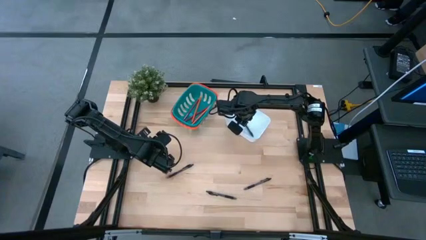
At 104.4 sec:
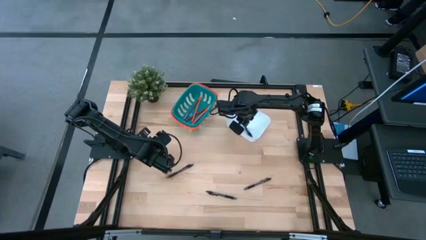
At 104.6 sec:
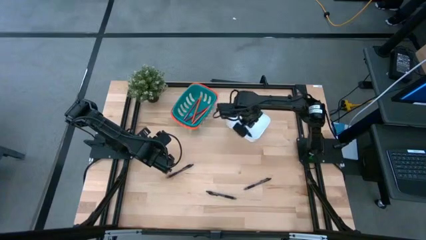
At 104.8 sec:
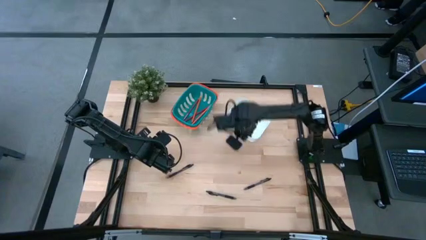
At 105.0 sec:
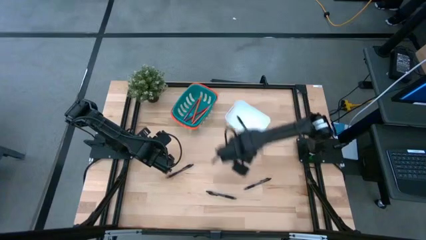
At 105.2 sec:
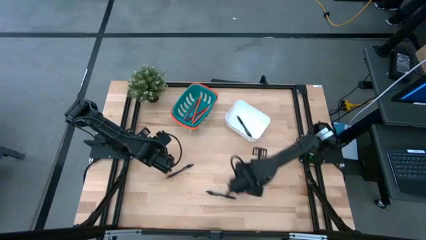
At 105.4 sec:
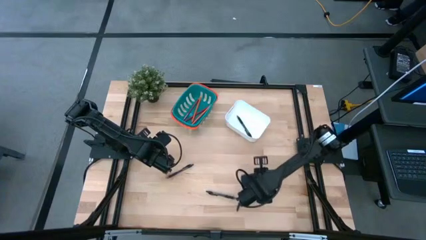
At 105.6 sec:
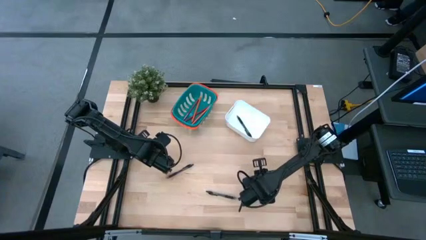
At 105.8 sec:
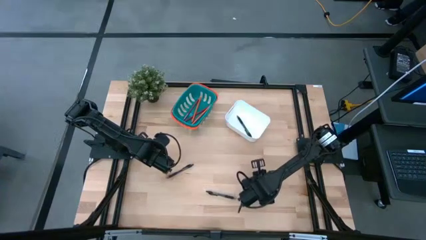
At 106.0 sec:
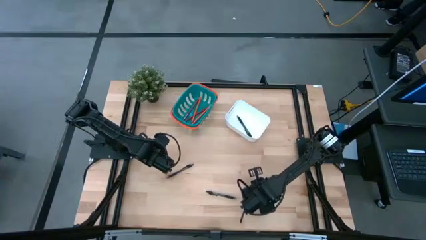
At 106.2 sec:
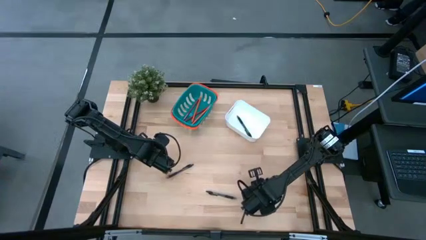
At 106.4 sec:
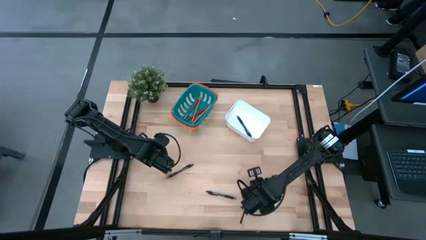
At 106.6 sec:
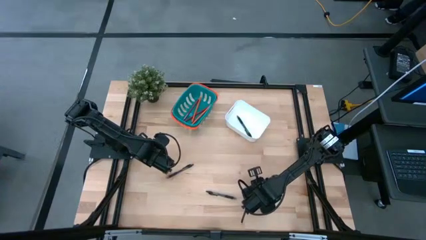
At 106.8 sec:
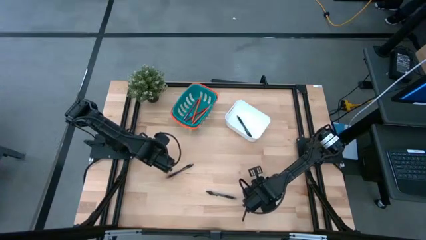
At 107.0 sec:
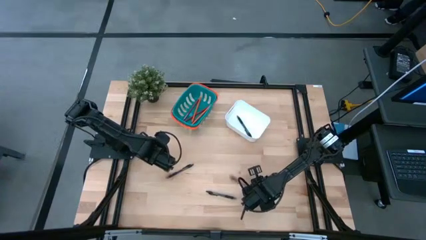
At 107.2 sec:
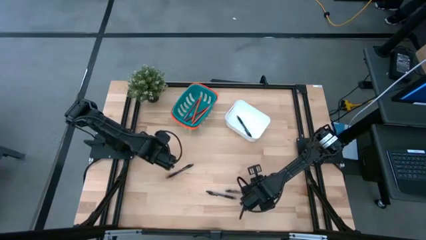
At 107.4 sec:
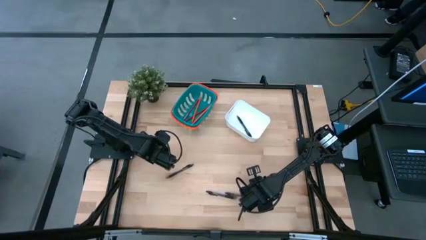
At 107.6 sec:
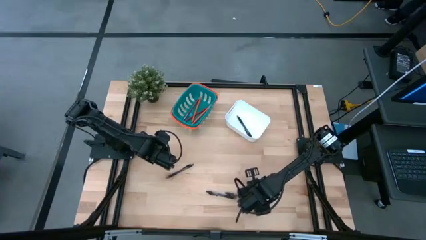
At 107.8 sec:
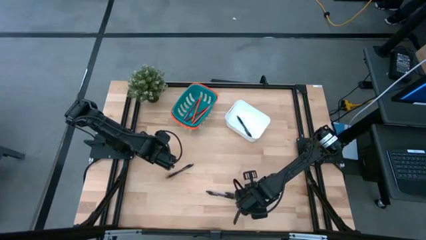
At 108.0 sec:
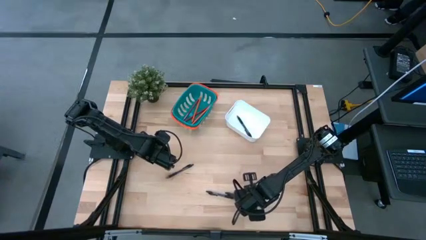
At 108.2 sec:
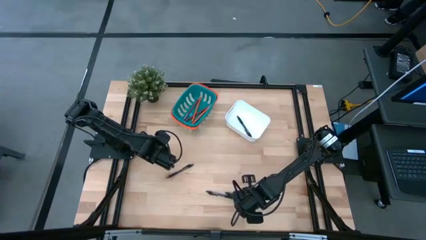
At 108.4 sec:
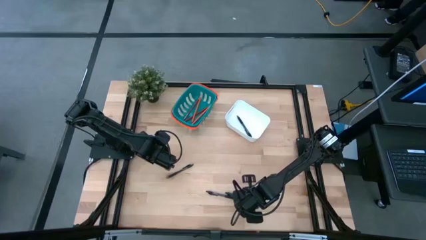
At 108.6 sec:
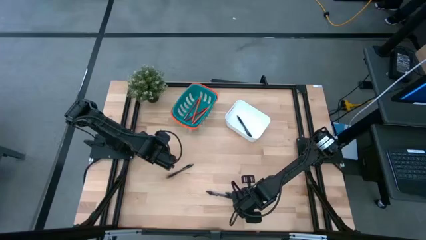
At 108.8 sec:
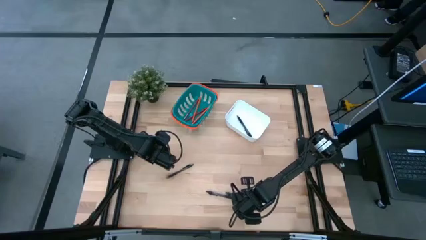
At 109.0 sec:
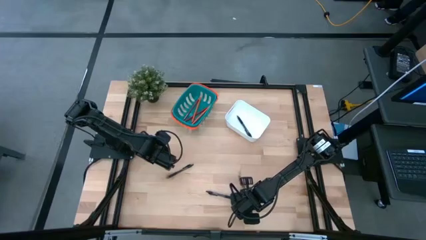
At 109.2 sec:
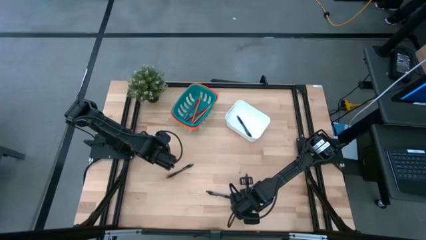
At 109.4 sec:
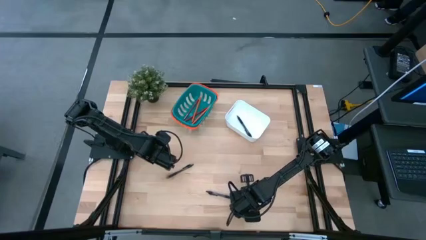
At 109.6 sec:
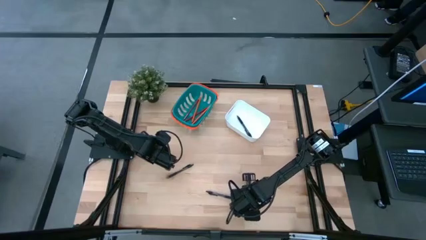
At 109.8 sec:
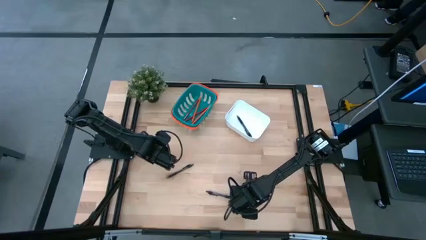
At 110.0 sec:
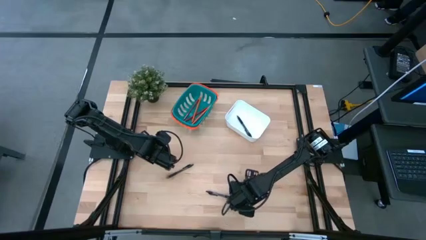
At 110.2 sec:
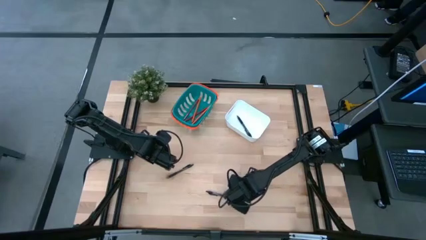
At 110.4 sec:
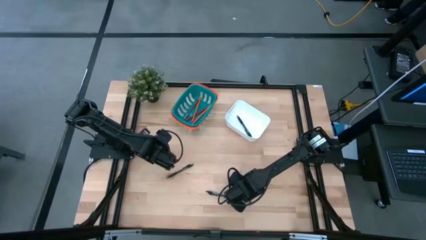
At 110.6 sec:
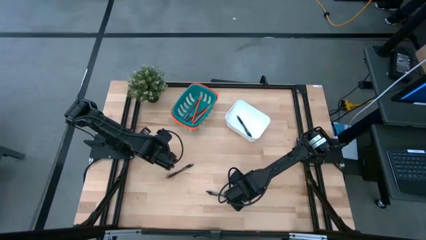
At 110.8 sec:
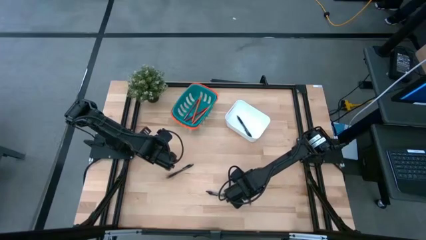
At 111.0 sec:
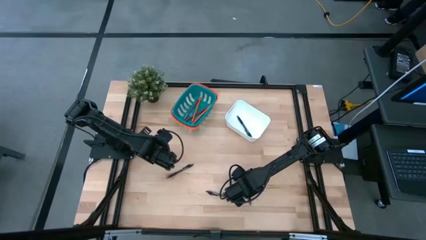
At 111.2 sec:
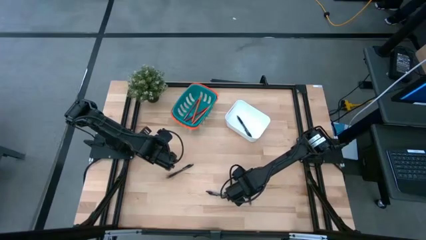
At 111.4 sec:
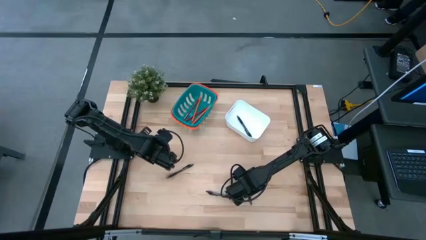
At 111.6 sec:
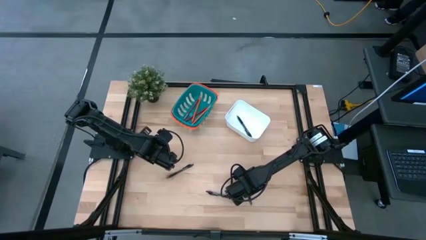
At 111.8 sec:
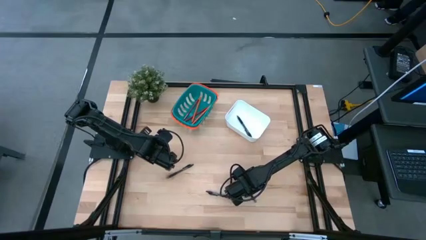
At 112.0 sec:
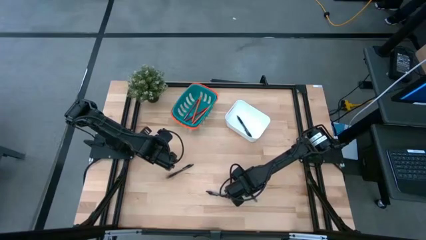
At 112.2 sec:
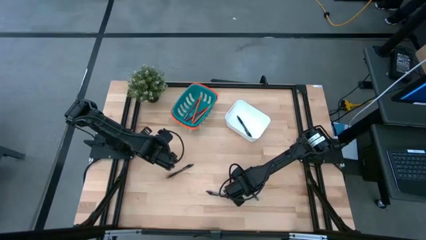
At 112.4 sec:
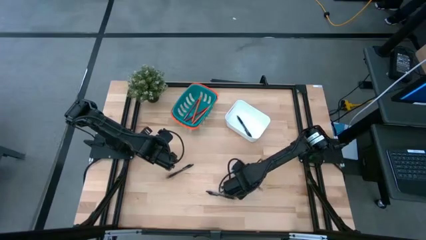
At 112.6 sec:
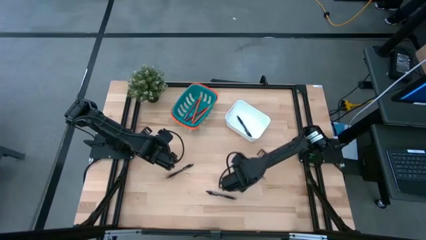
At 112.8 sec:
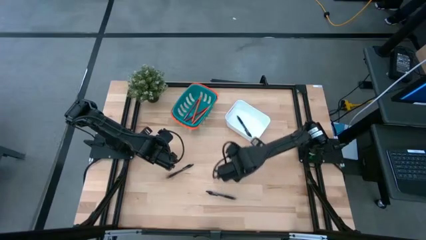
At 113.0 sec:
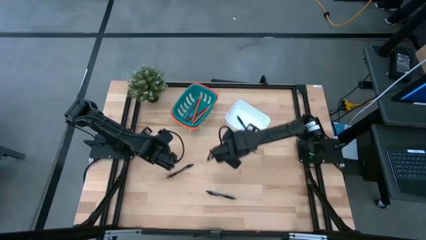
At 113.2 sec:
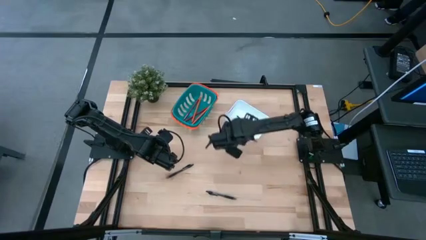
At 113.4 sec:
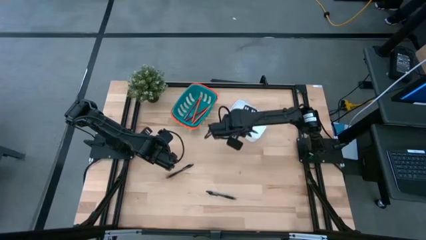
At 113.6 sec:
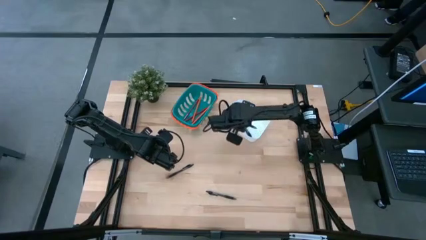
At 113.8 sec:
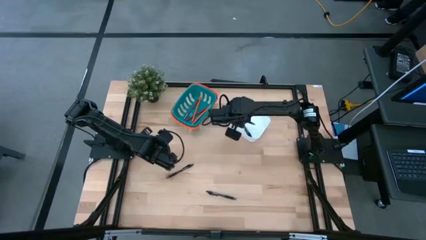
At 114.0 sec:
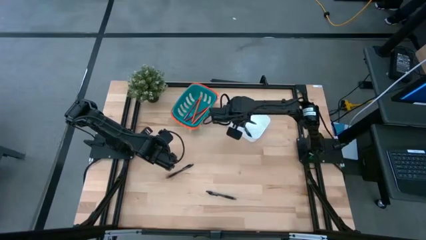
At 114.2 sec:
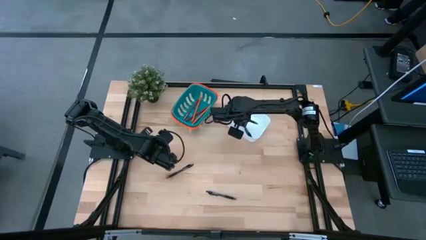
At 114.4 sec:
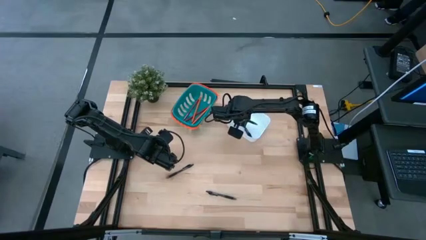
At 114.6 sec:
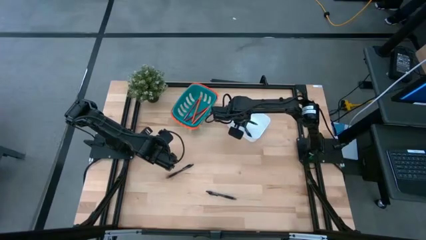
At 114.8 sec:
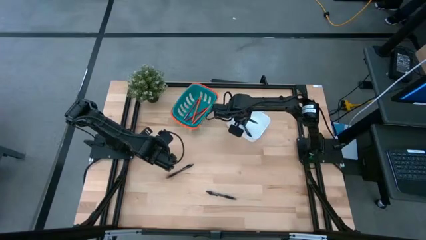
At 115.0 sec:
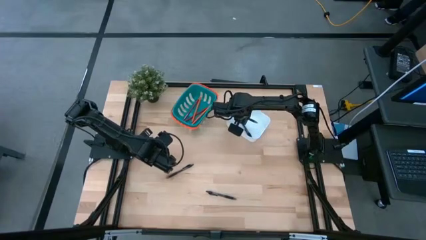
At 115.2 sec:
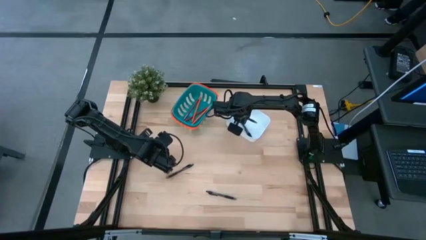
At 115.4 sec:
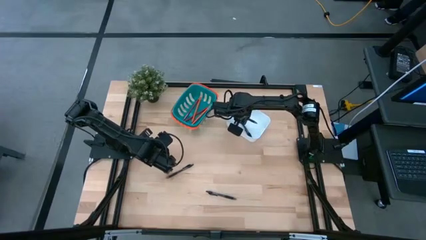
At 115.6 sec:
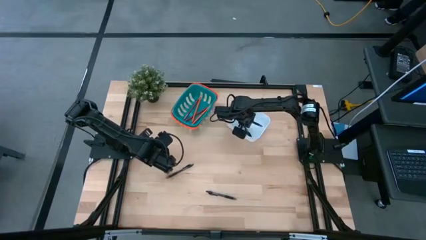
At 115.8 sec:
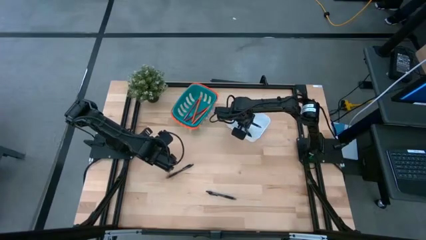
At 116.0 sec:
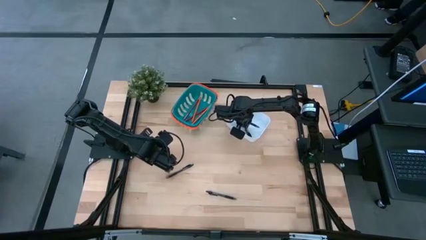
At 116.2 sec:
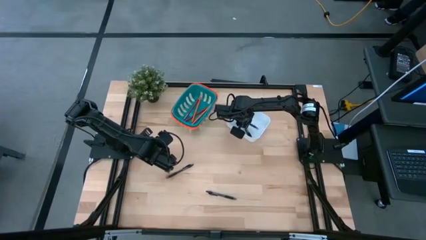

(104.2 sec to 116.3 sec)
Task: Sort pens & pencils
Put the right black pen into the white bin

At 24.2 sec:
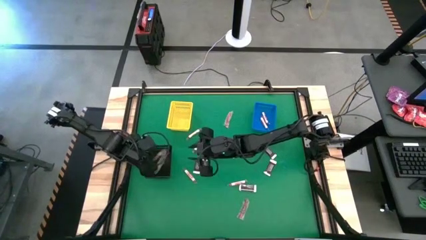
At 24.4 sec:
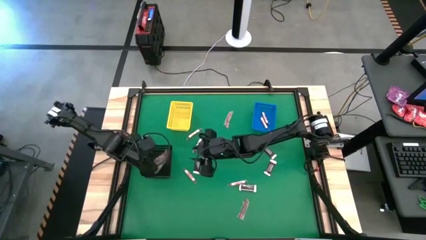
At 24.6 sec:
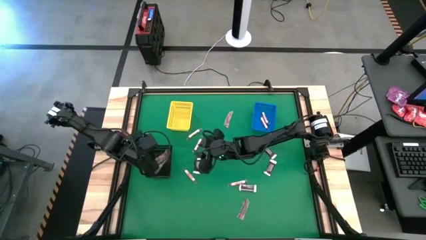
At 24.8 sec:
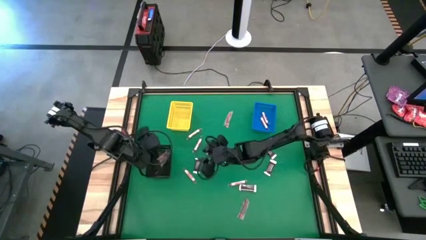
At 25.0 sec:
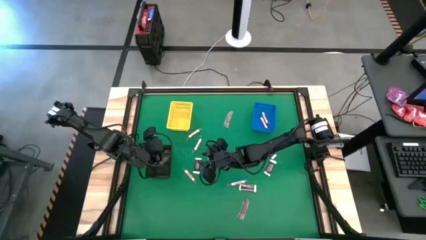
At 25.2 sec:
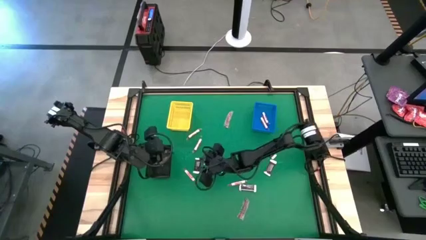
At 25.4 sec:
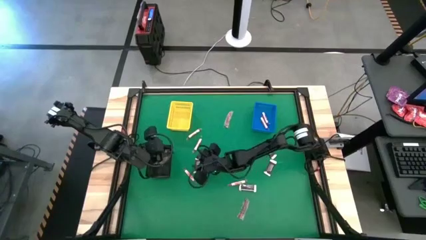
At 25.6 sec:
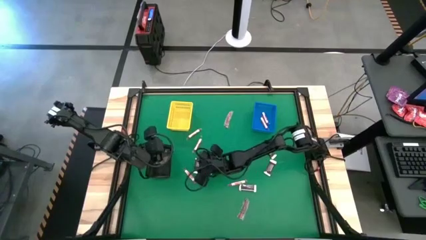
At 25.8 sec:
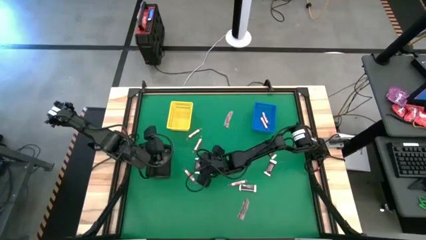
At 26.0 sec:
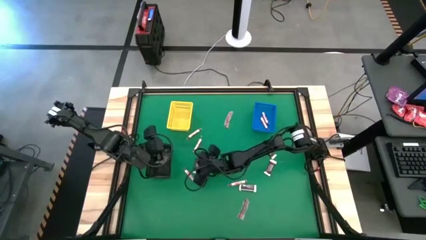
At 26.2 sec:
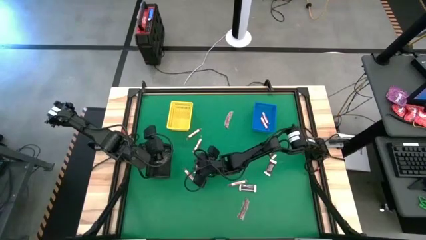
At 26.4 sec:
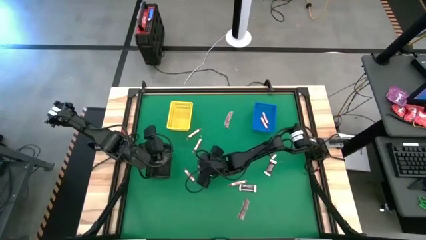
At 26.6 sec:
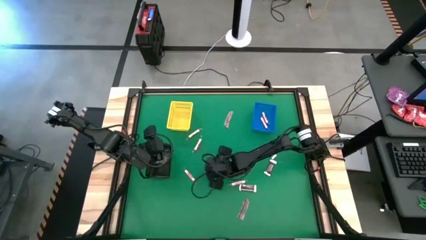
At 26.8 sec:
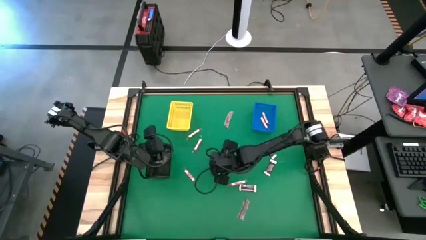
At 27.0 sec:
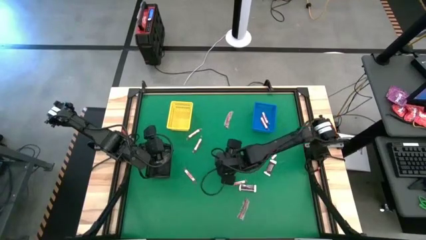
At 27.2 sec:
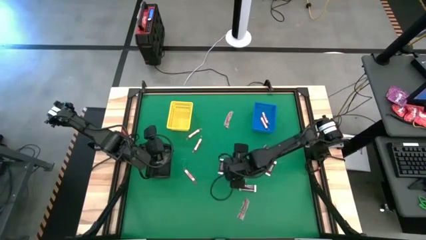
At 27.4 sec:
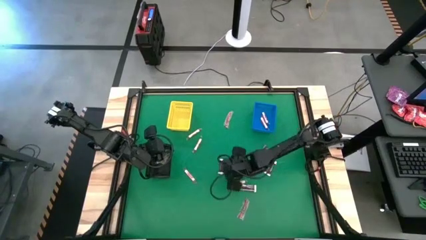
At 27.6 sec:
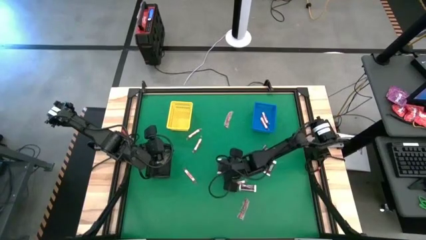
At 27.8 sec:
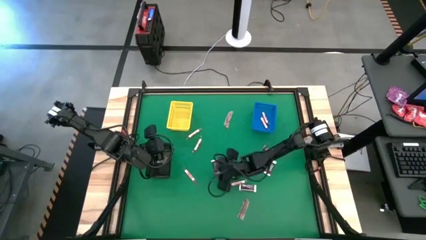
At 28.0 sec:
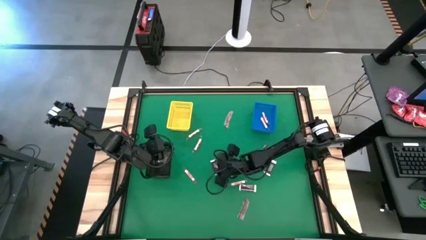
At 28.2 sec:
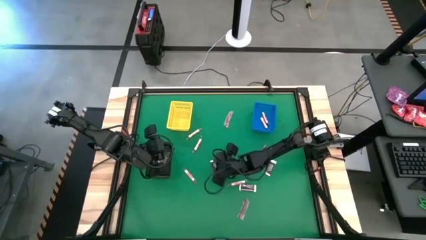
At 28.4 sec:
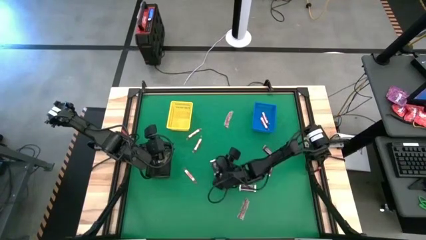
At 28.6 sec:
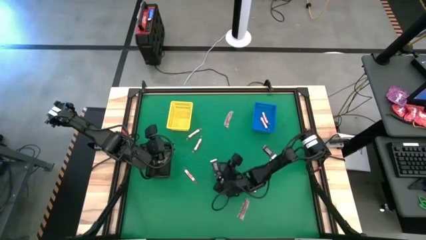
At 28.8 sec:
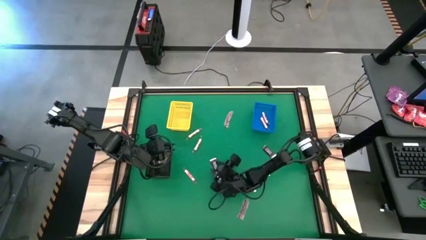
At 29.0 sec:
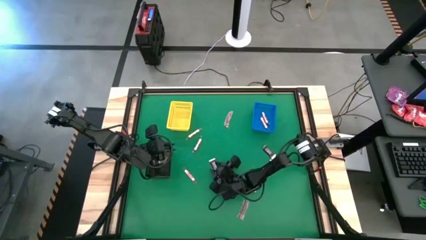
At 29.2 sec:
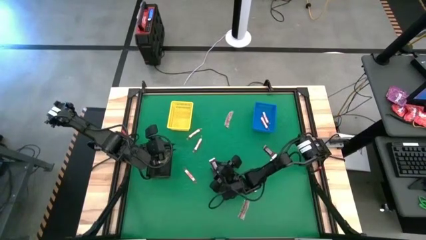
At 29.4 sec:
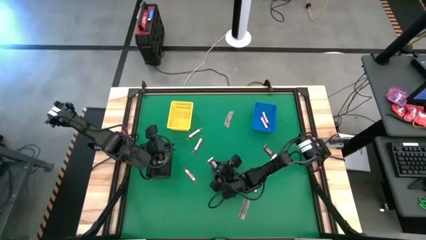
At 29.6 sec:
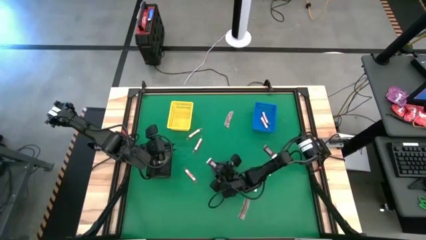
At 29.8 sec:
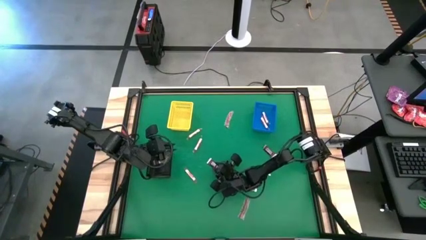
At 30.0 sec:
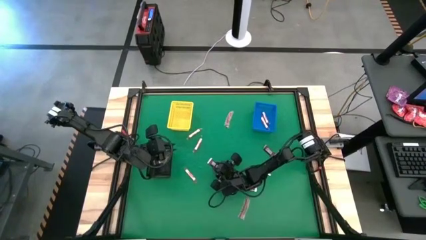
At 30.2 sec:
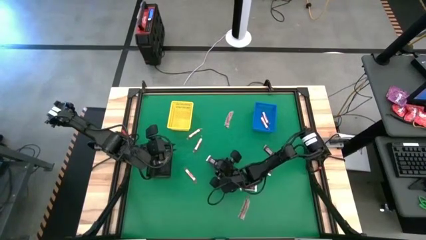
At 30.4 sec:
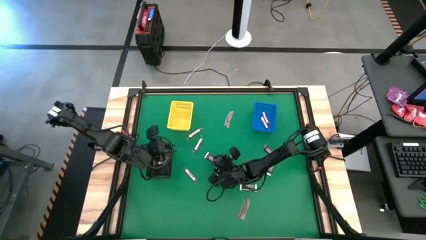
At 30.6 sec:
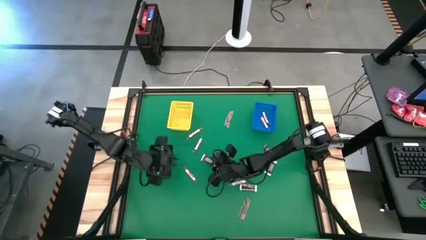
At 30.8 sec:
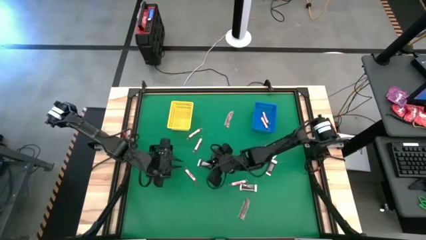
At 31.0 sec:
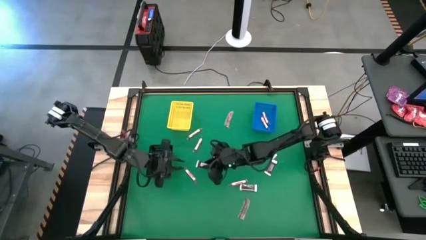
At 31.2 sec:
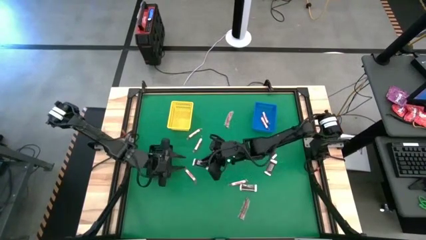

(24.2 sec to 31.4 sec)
Task: Sort candy by brand, put in halloween buckets
Put the brown chocolate into the yellow bin
